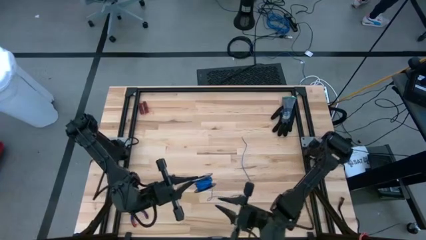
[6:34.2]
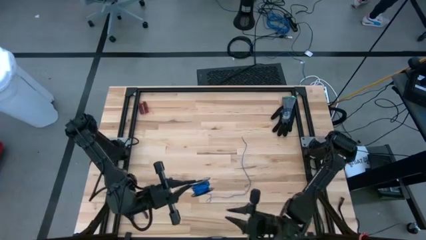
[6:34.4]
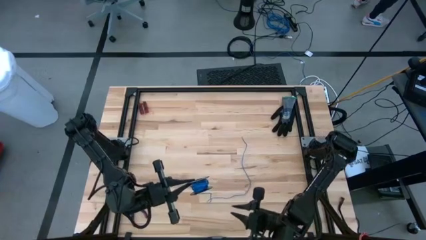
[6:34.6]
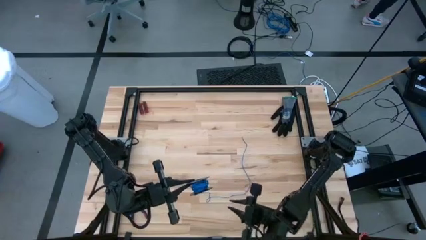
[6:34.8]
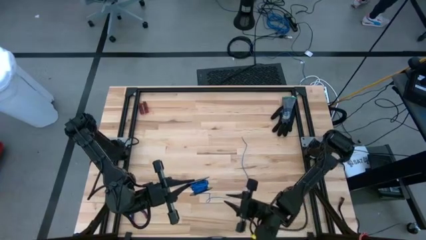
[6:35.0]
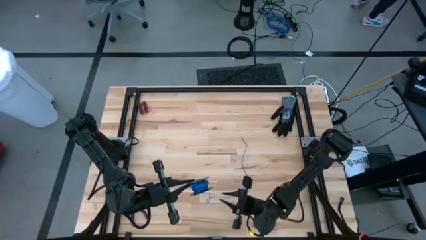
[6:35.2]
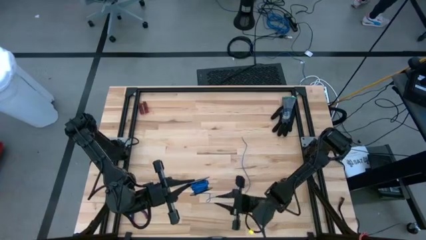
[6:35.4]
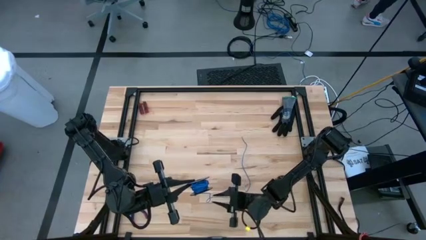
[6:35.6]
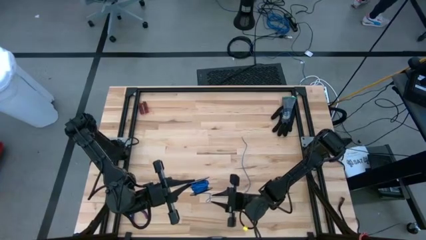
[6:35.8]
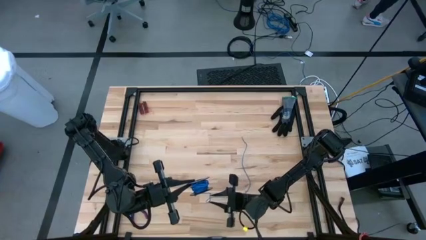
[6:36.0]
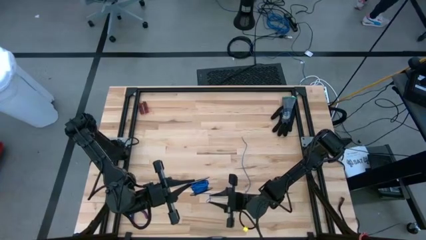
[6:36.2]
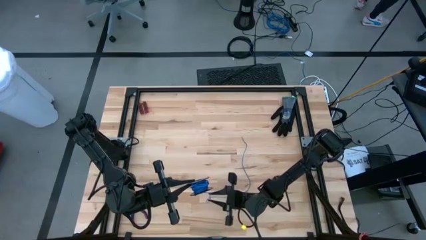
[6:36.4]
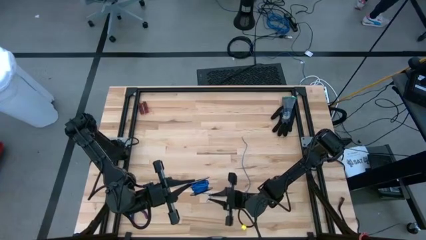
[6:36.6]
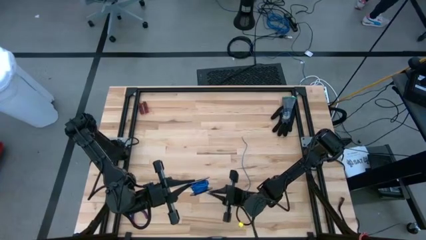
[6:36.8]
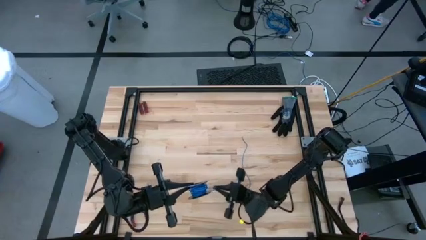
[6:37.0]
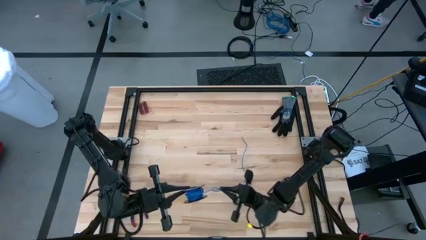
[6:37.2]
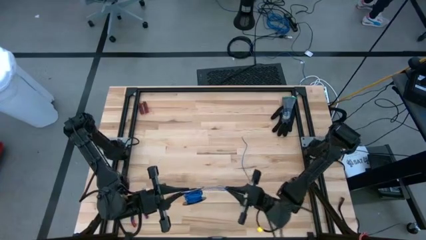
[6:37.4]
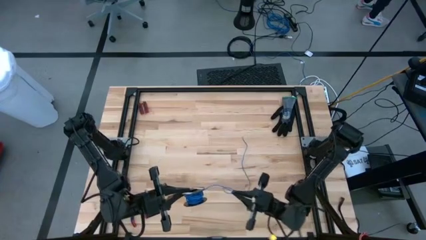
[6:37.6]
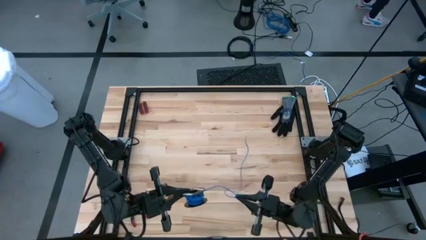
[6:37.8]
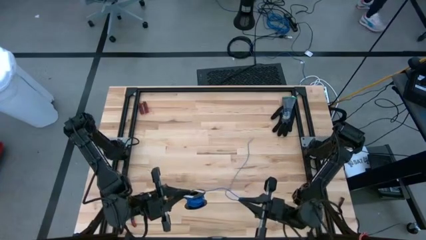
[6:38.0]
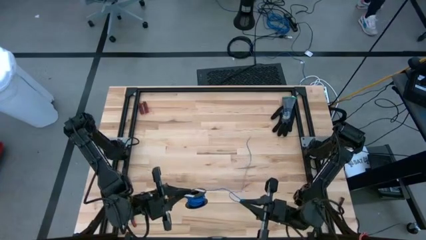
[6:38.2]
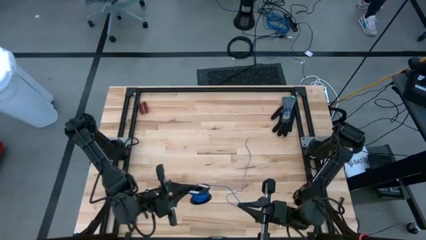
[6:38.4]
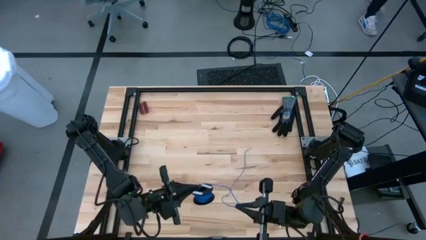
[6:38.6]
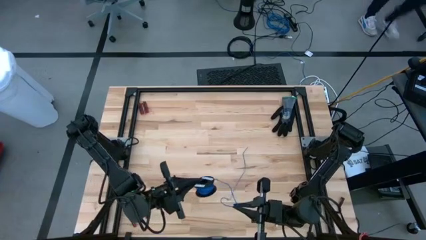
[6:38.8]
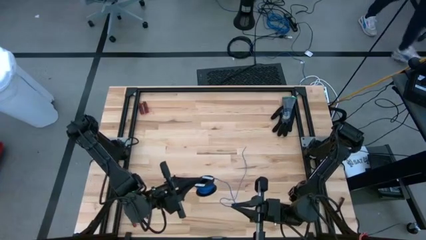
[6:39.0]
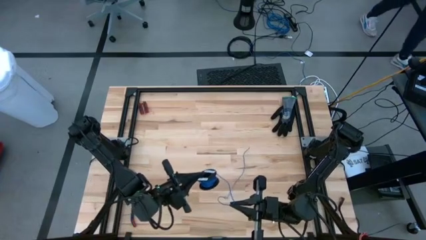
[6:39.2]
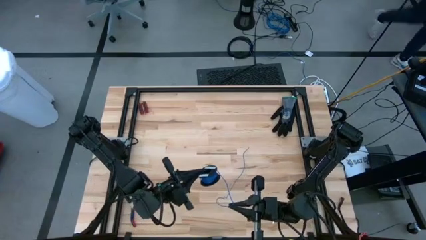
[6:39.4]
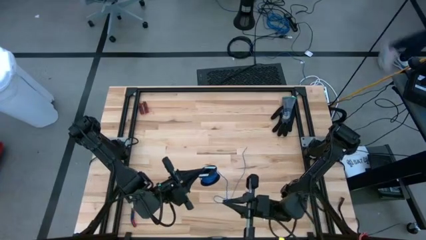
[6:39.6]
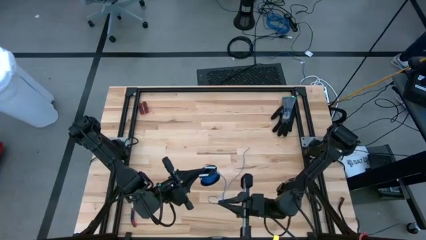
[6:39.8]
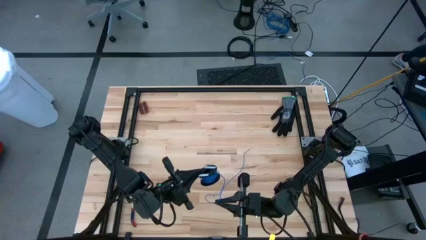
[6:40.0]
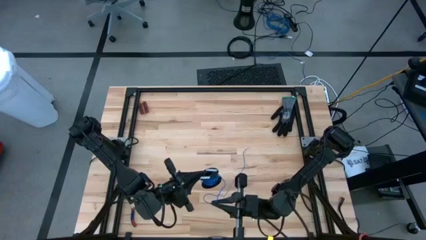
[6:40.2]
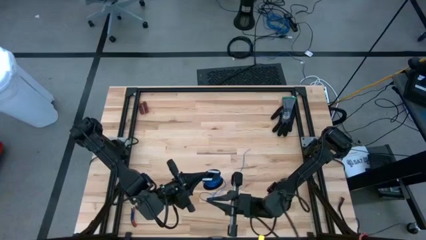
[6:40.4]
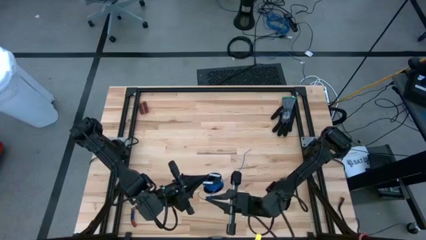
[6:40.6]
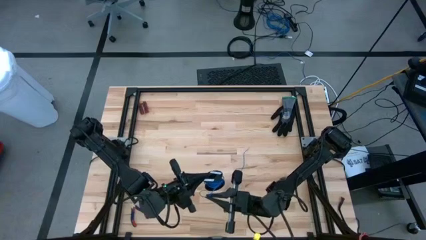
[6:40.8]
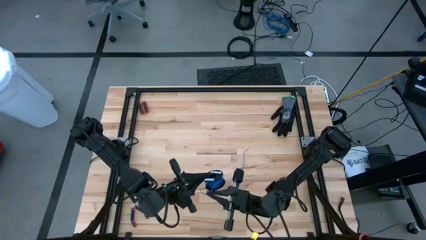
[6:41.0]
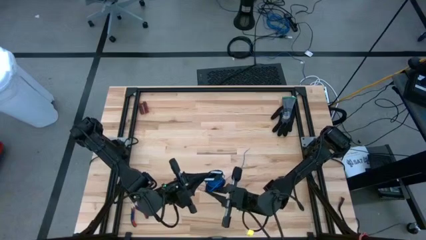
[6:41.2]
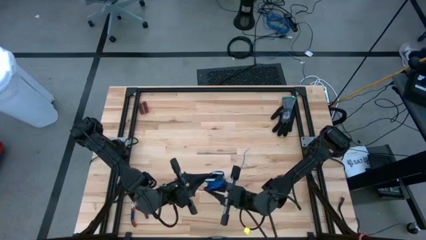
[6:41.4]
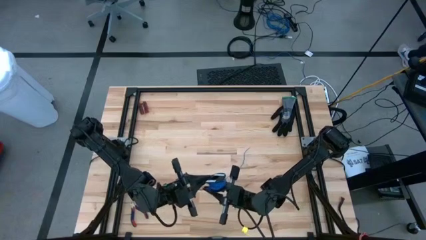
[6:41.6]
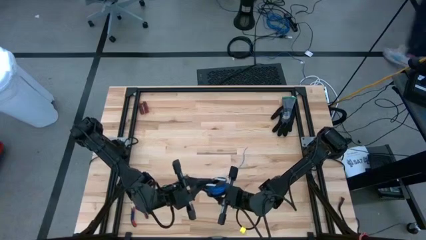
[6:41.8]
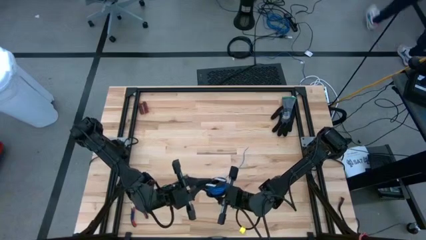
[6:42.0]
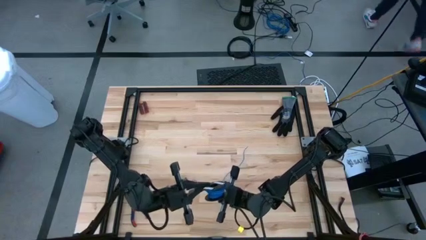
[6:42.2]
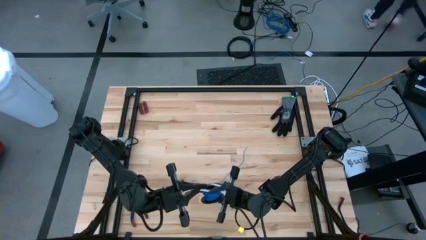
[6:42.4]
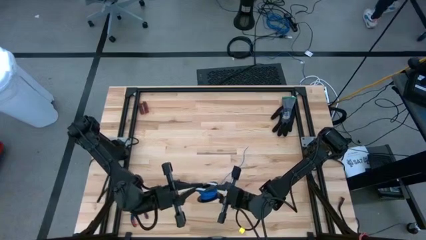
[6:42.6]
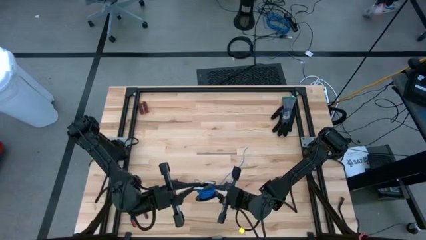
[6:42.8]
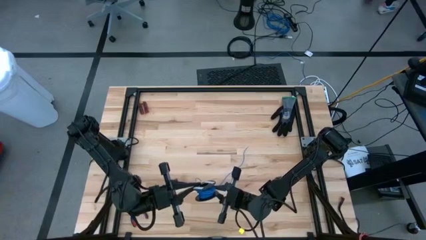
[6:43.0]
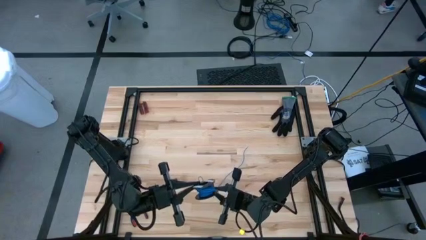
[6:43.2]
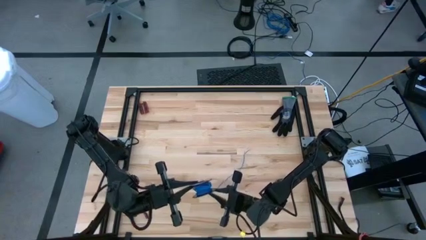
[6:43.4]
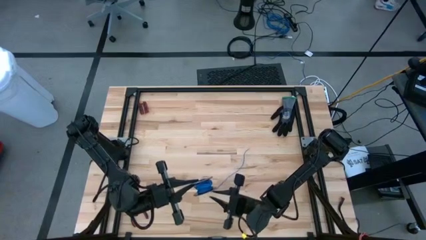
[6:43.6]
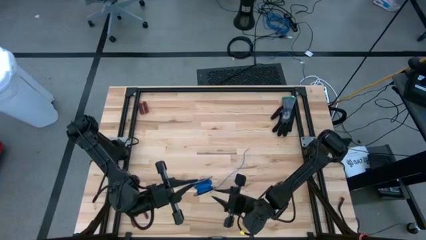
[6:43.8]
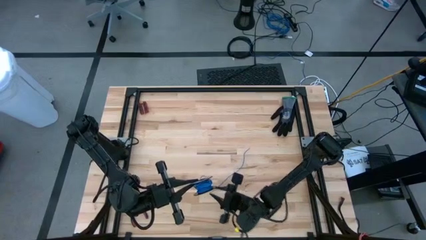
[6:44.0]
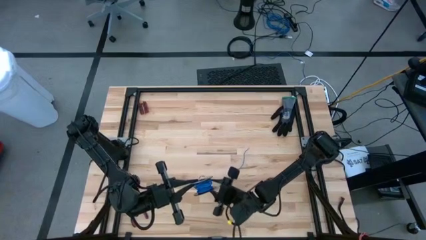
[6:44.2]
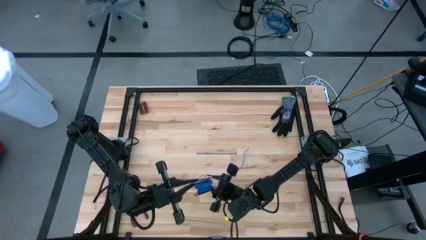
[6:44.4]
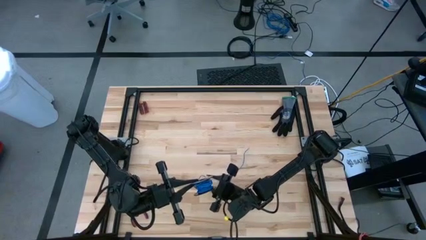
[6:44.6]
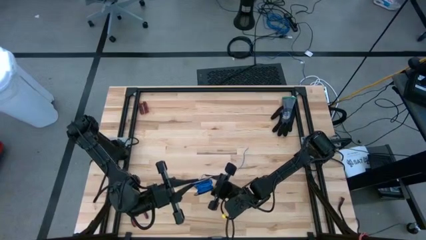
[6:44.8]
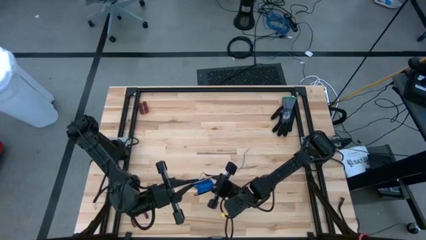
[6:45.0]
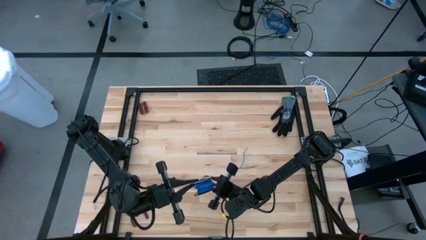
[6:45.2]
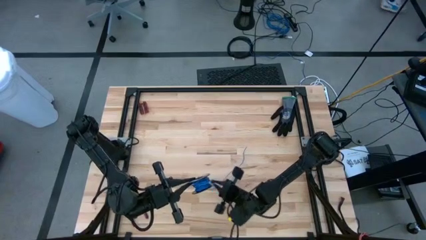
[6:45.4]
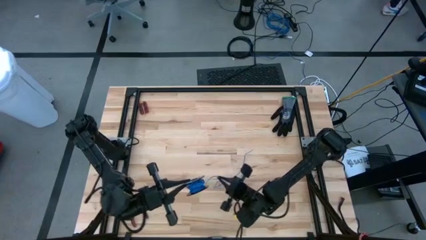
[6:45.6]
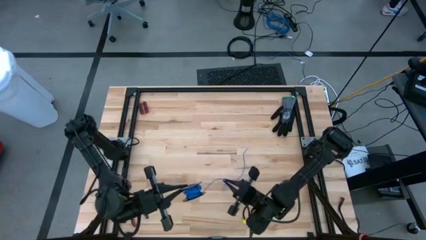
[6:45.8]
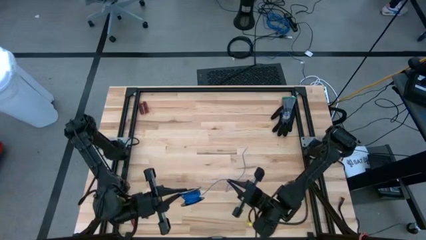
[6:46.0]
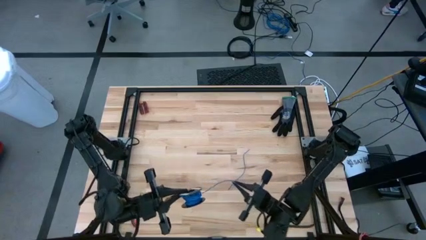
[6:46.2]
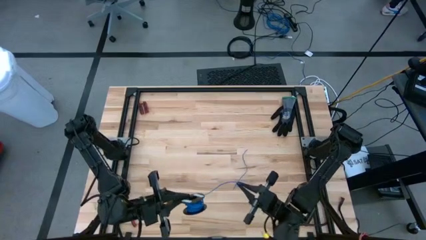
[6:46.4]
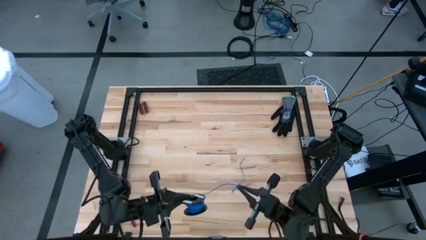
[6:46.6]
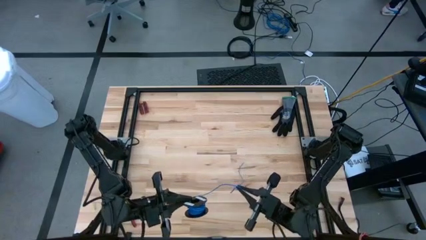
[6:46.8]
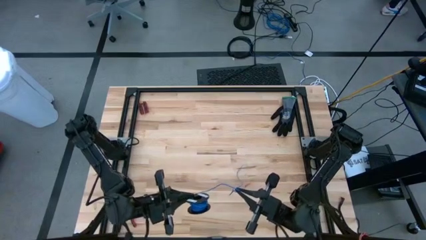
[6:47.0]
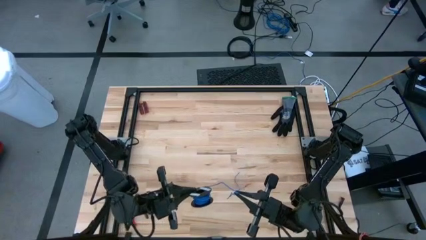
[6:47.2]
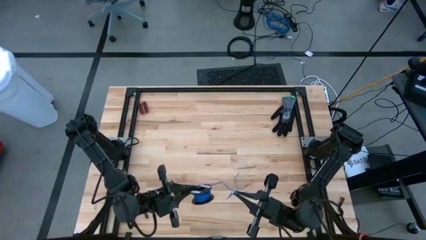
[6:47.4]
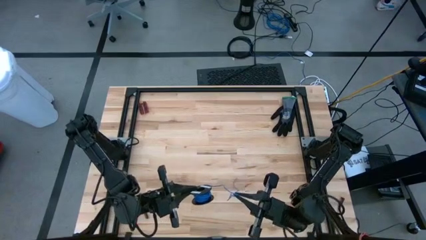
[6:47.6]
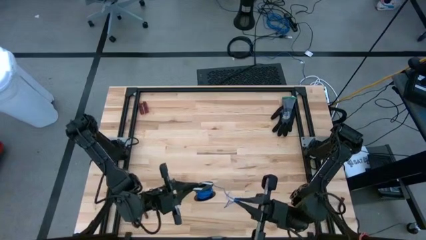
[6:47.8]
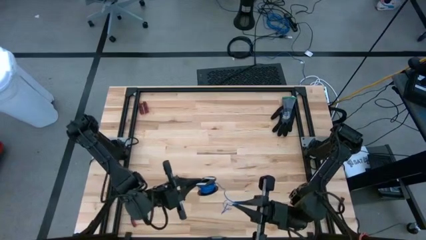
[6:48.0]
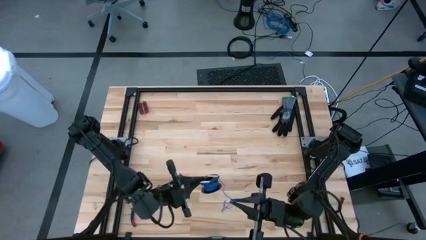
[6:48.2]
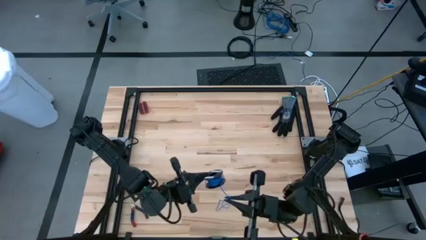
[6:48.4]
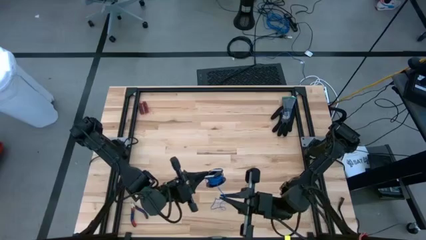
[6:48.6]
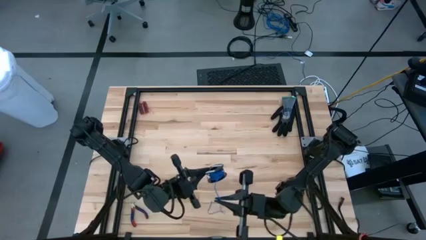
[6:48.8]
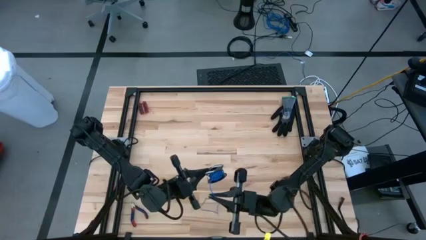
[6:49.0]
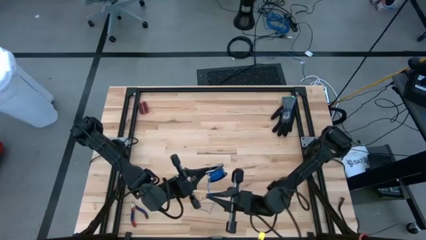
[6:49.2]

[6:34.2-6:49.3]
Task: Coil cords
Coil the blue wire onto a spool

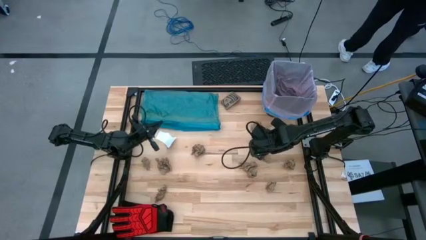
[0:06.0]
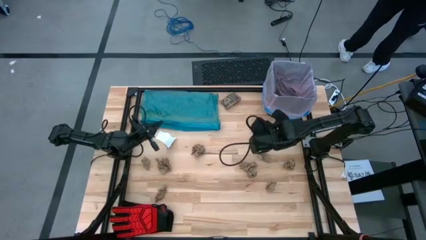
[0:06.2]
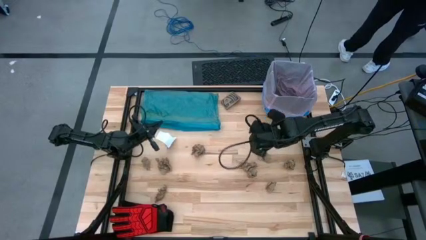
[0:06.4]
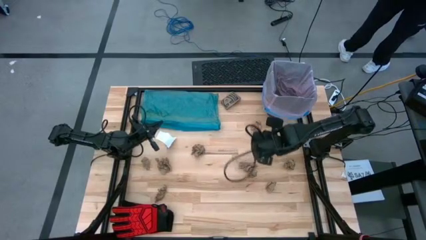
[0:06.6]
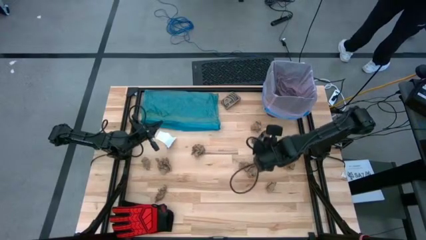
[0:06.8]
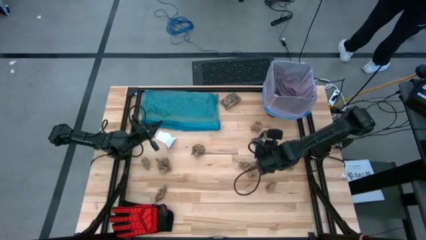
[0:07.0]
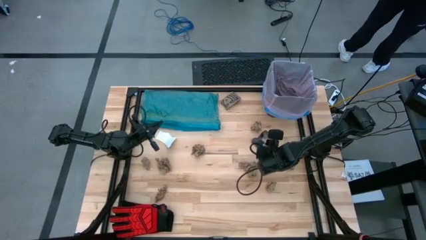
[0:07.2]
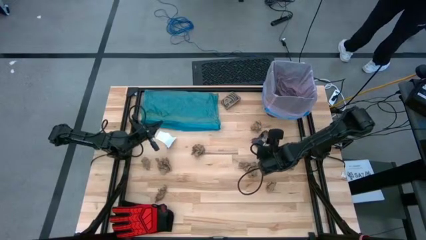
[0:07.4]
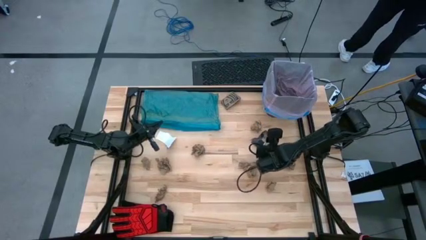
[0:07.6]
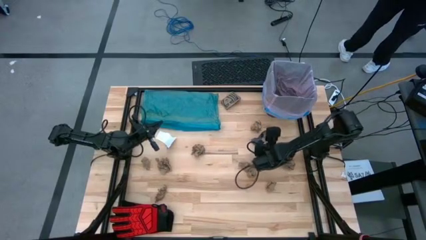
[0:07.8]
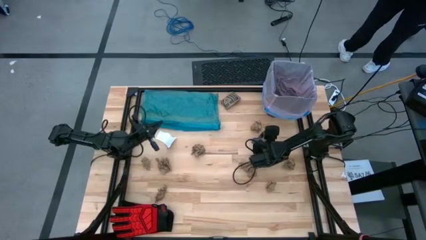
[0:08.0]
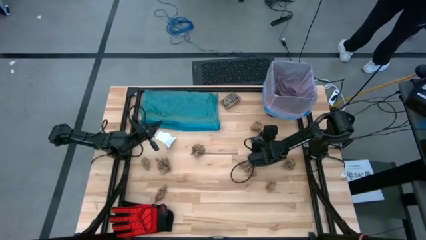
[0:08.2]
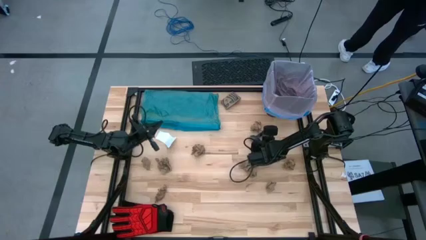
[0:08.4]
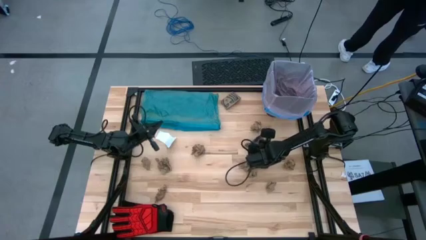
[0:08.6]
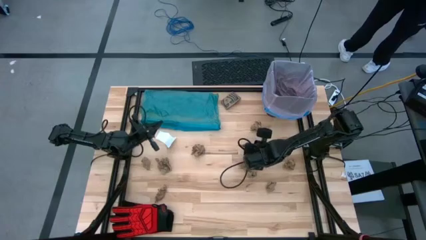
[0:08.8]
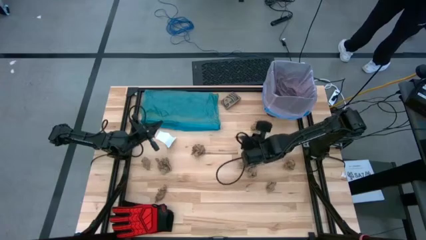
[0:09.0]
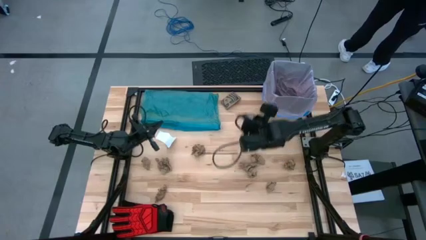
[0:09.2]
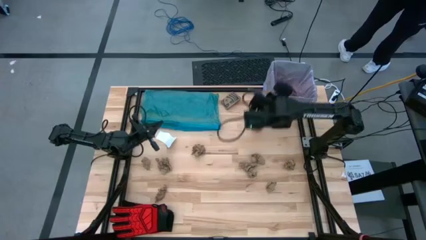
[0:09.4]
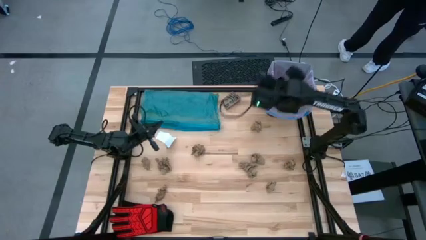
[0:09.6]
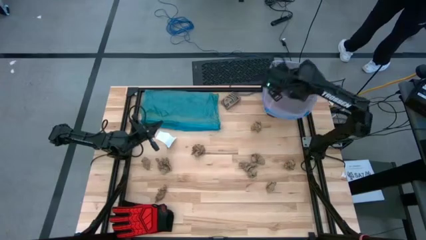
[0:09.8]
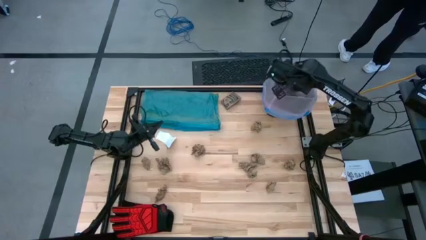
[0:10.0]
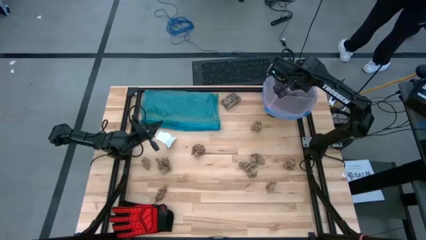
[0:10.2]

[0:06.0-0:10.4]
Task: place trash/remove bag and relplace
Put the black paper into the trash bin
